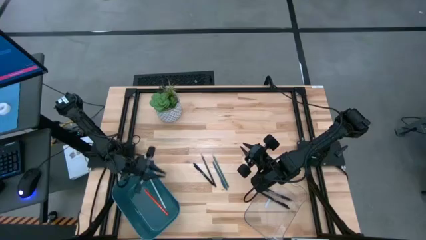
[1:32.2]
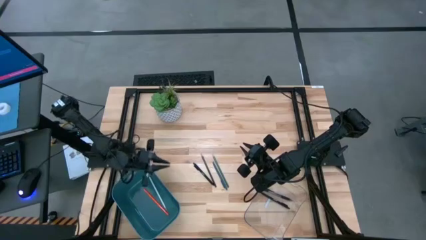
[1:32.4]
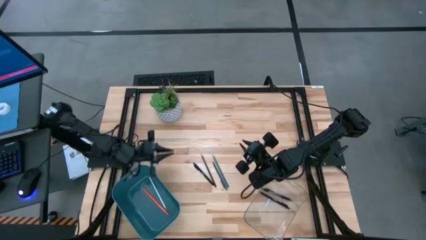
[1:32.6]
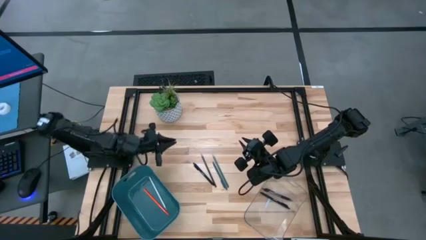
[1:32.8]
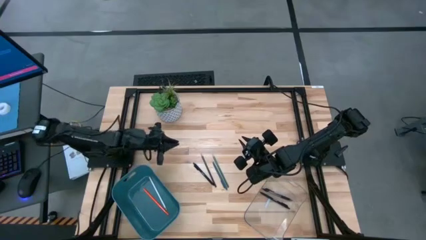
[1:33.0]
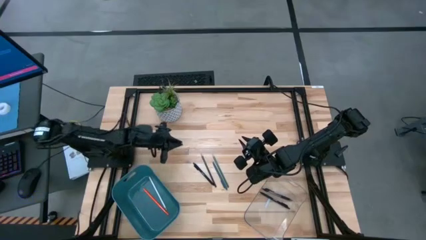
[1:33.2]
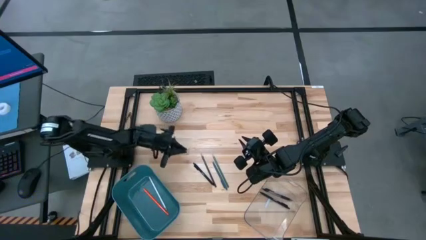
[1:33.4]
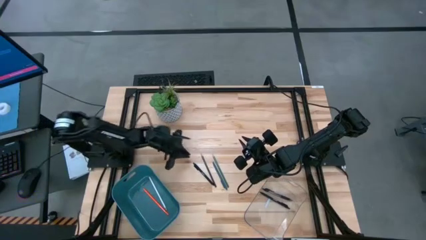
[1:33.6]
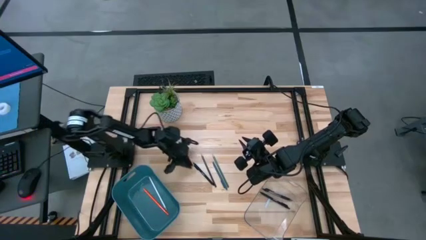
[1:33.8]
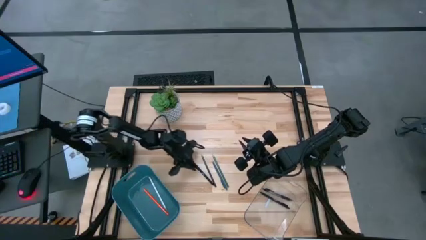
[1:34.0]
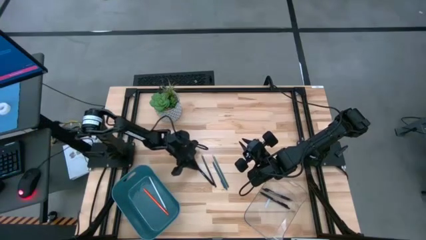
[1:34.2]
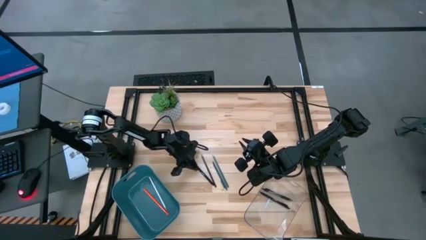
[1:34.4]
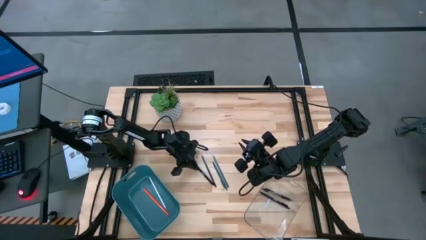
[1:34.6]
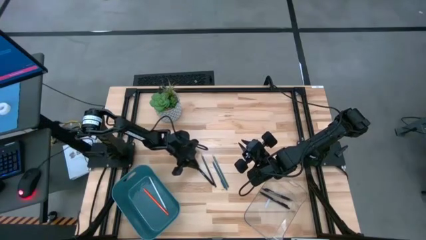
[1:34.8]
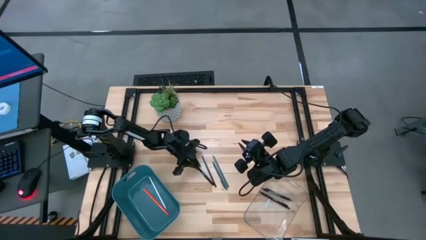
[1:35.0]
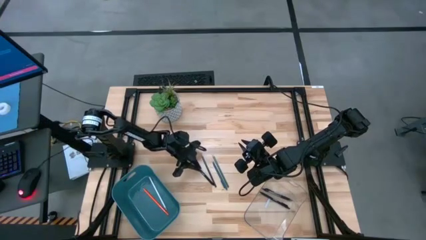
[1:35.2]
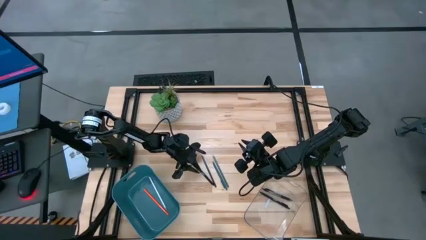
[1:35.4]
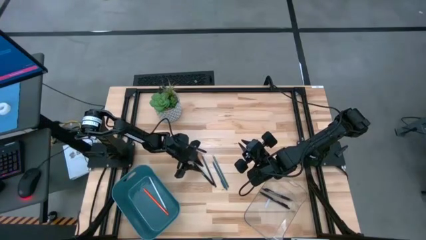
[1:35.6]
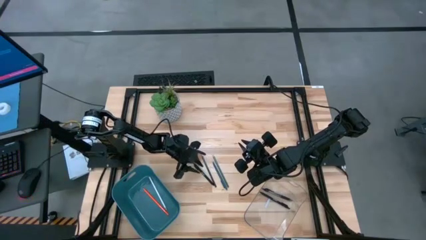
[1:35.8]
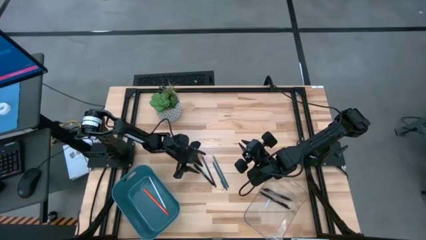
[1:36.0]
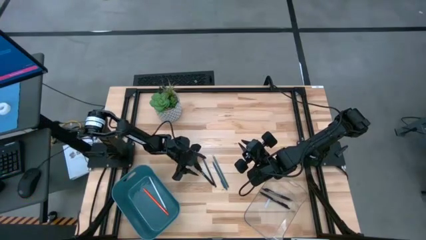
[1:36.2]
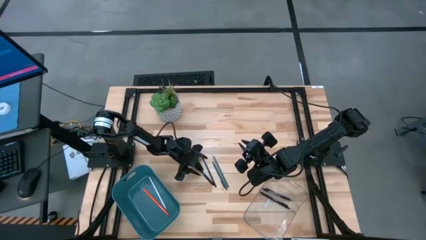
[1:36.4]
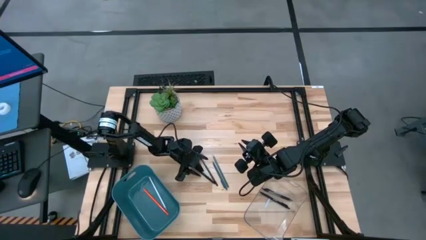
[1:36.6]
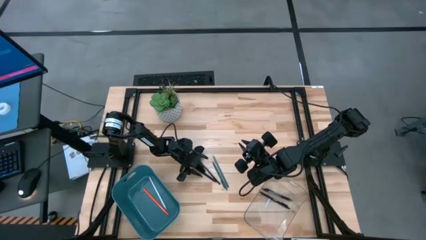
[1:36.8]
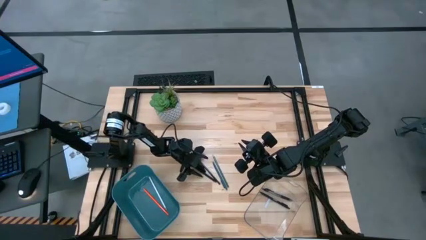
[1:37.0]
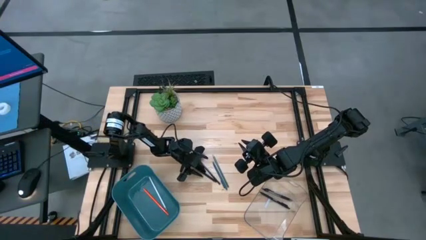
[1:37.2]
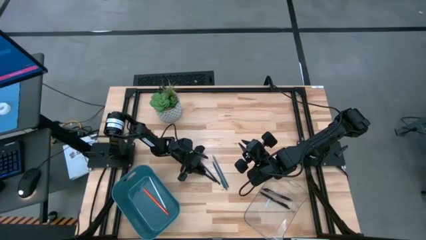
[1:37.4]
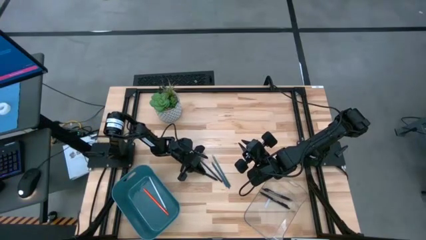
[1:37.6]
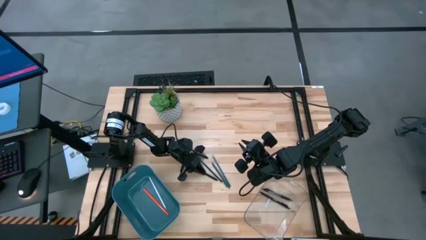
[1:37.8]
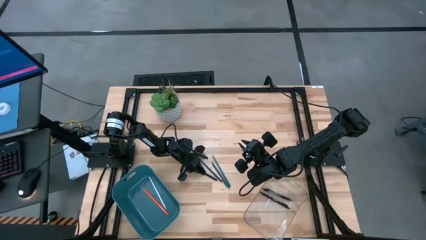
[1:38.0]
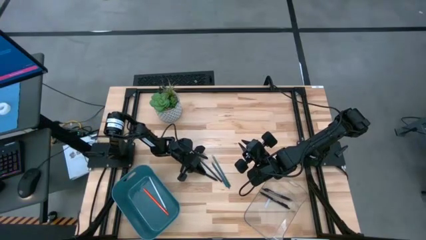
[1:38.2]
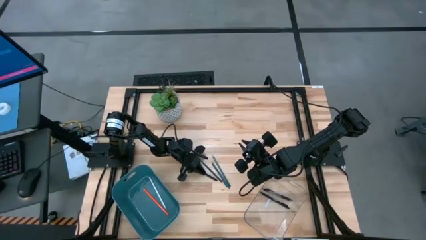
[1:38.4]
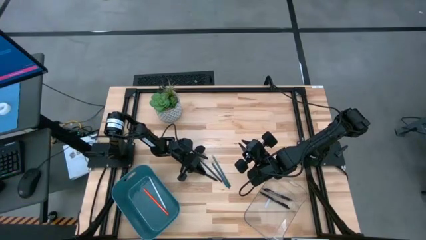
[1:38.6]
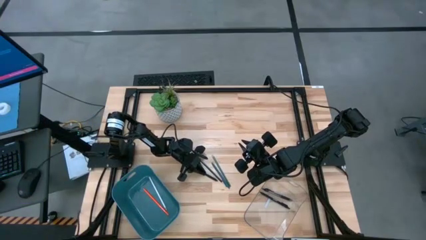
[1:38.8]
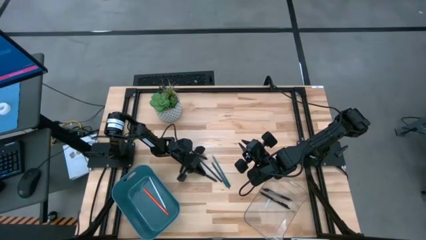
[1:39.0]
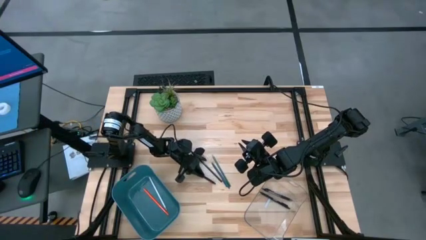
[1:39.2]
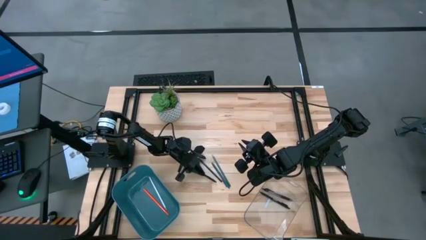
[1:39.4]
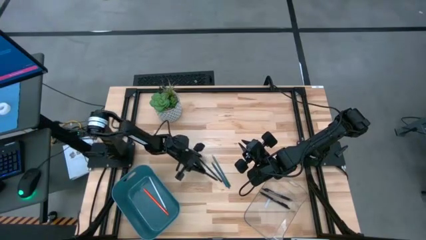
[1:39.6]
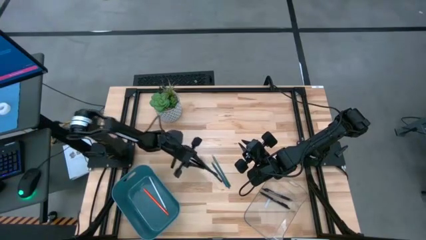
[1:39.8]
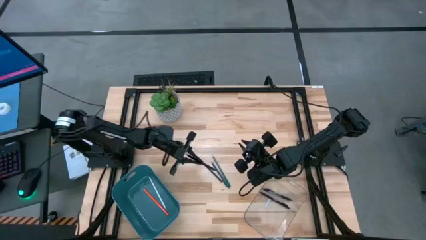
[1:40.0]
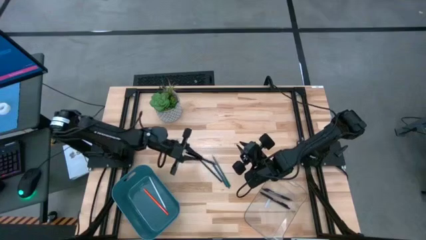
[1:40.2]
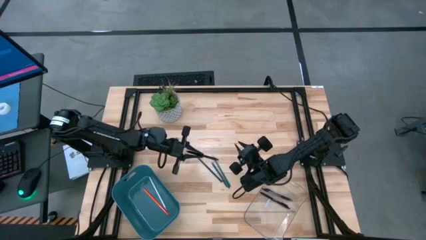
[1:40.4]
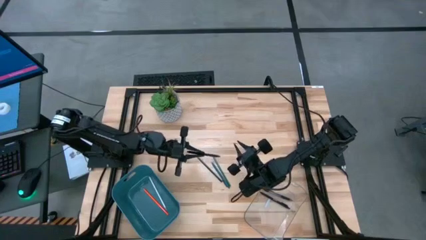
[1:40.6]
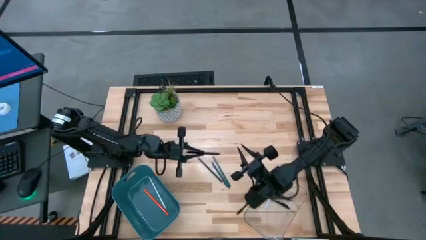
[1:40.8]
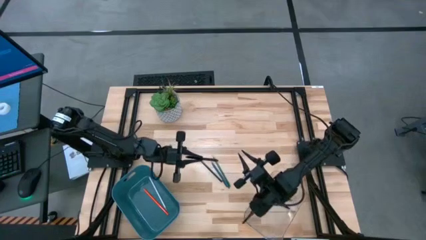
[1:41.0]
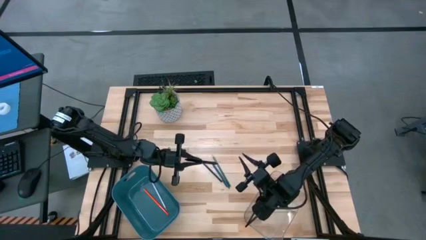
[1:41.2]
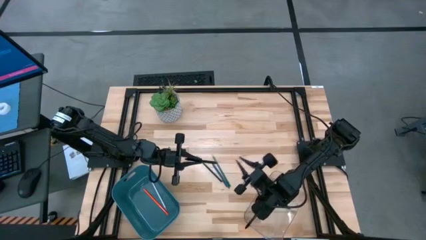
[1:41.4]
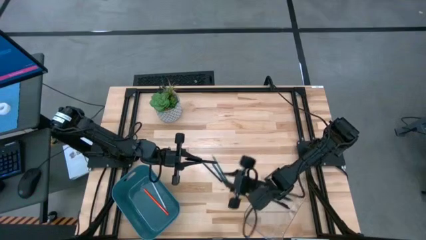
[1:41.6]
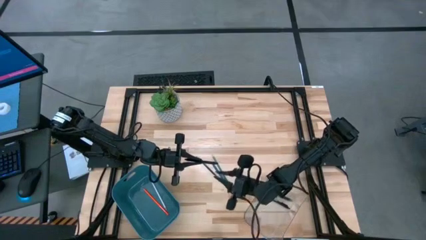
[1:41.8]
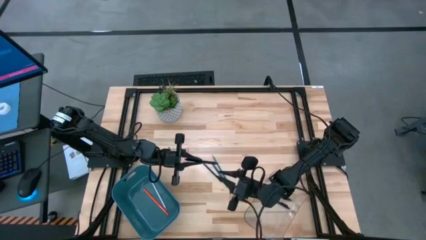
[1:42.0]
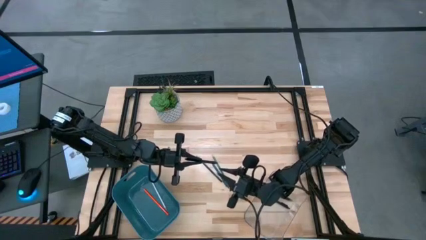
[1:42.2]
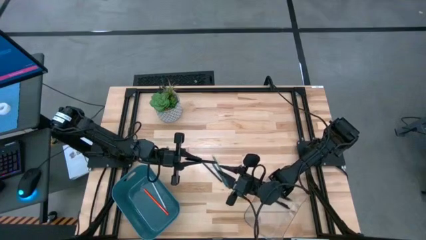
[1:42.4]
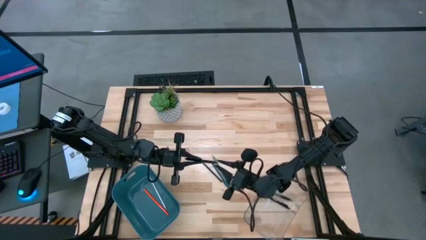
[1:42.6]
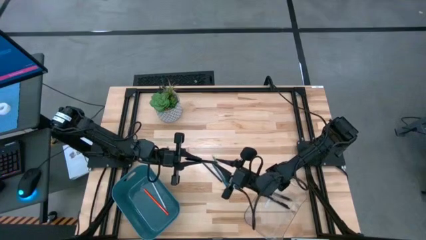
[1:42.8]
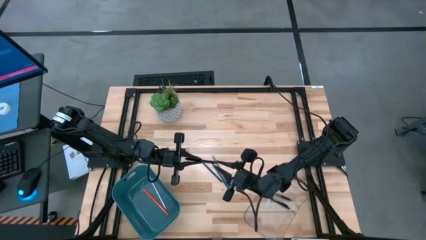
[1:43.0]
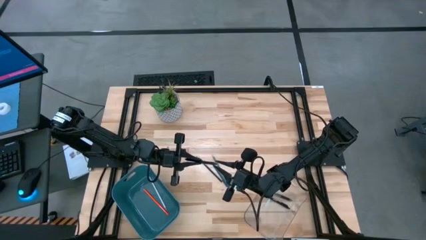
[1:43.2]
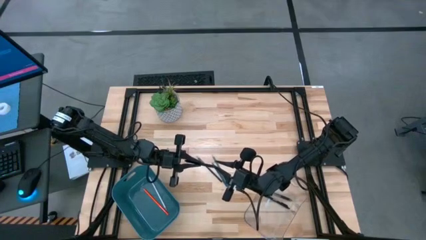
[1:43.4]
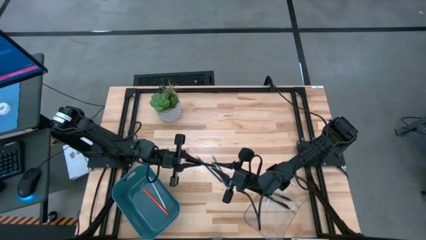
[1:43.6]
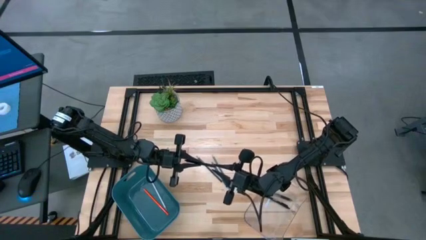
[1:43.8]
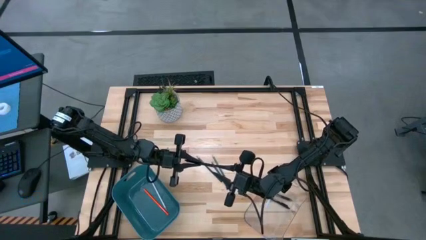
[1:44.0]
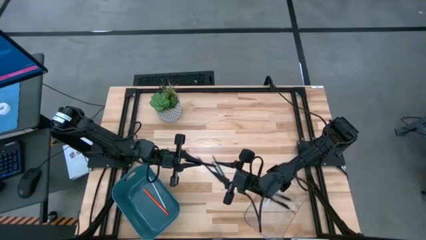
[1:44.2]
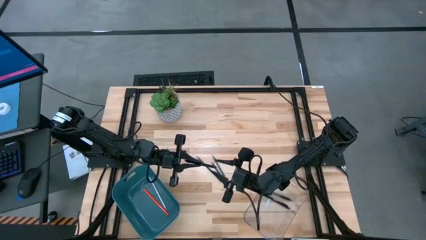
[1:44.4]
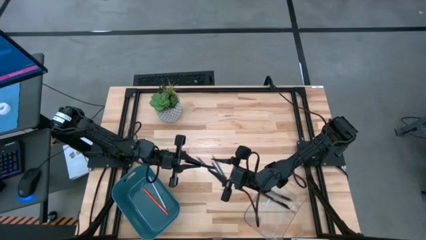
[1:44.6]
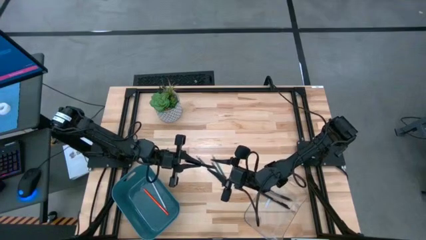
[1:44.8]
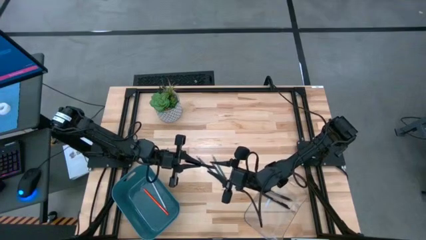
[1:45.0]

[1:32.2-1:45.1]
Task: Sort pens & pencils
Put the black pen into the transparent bin
